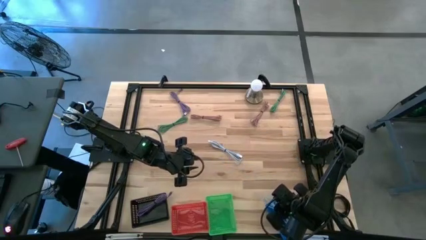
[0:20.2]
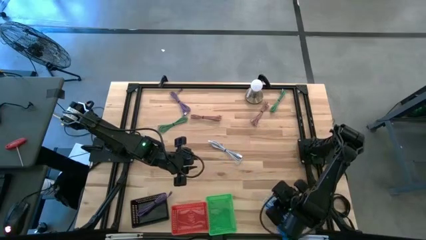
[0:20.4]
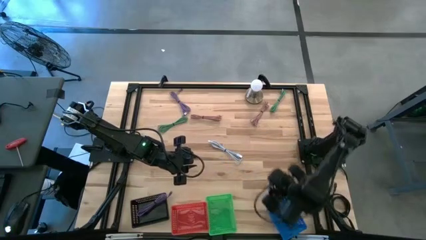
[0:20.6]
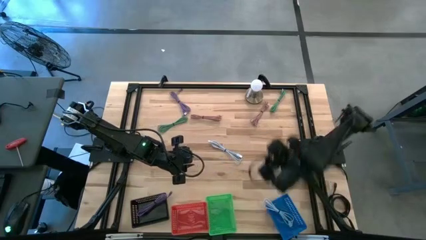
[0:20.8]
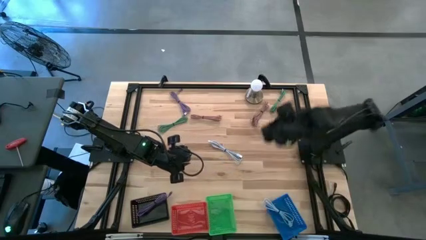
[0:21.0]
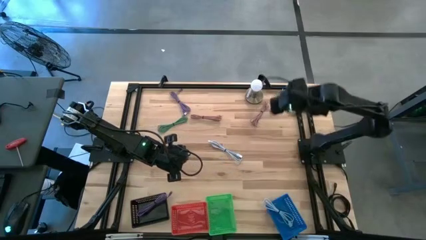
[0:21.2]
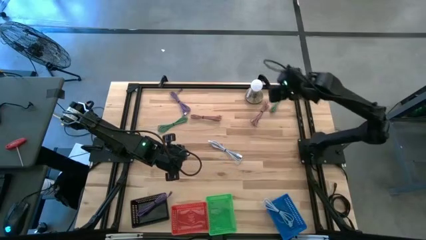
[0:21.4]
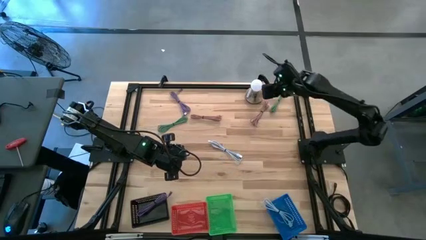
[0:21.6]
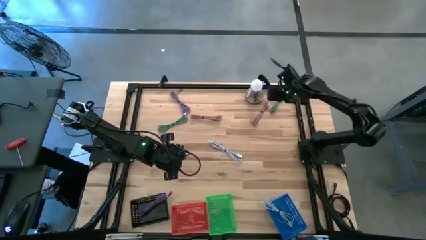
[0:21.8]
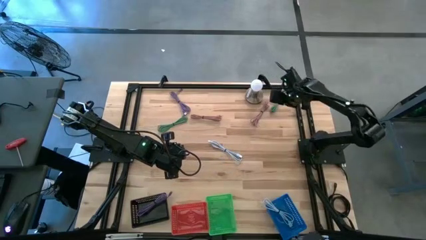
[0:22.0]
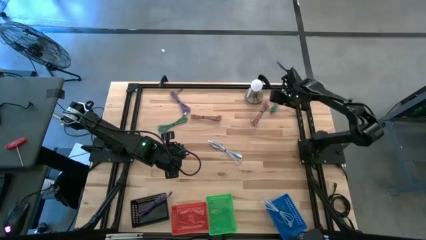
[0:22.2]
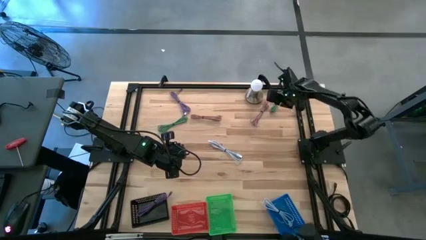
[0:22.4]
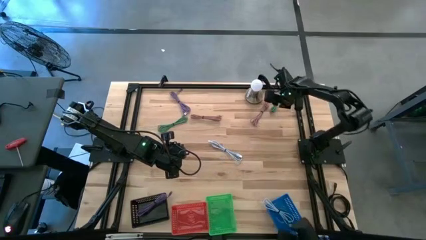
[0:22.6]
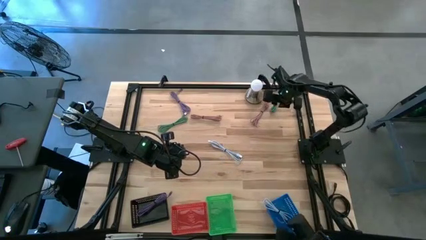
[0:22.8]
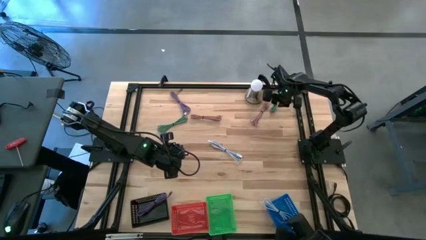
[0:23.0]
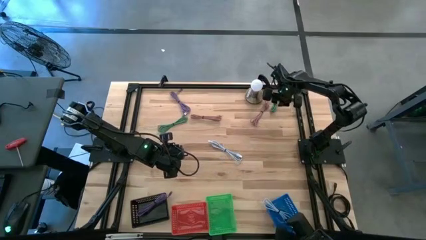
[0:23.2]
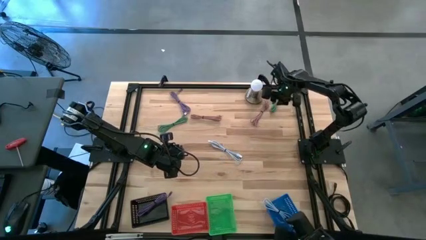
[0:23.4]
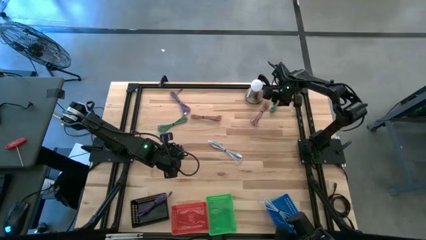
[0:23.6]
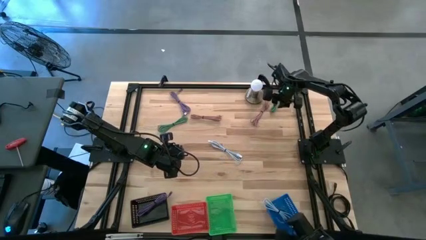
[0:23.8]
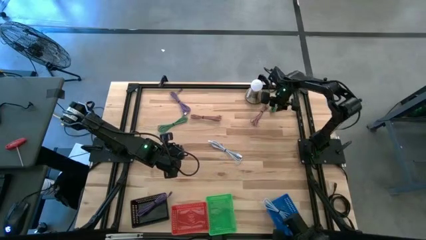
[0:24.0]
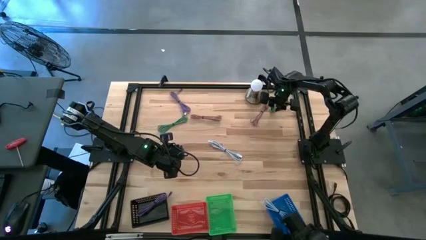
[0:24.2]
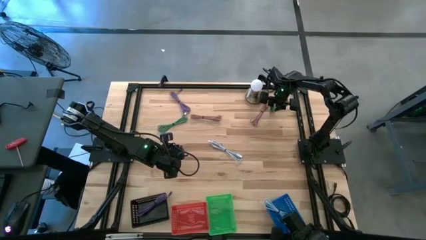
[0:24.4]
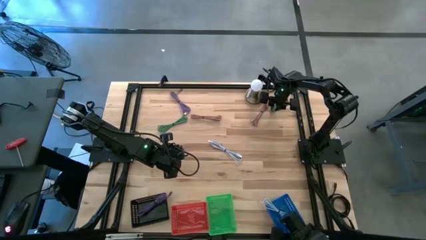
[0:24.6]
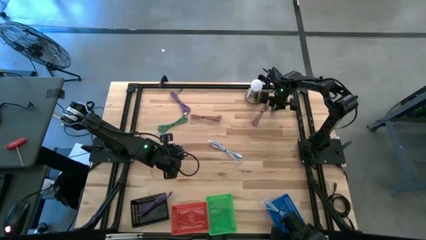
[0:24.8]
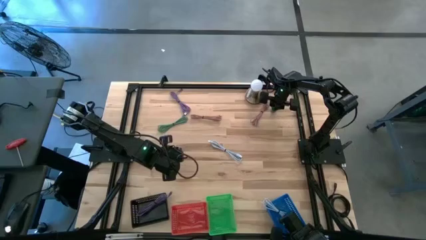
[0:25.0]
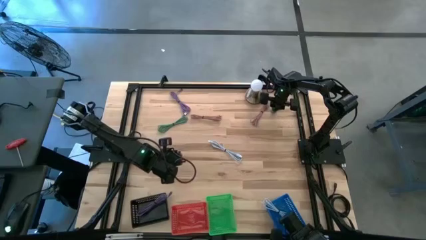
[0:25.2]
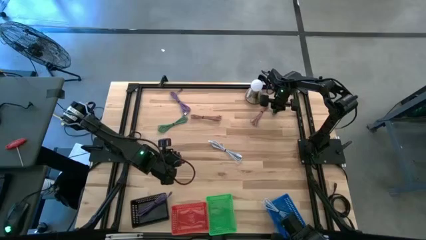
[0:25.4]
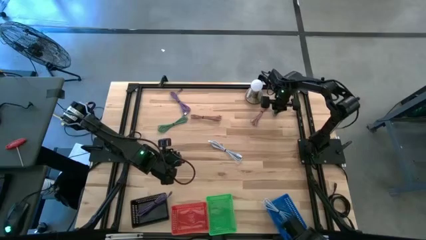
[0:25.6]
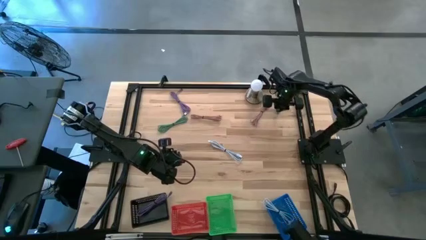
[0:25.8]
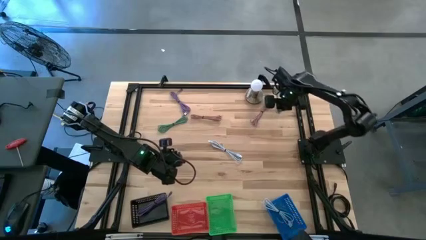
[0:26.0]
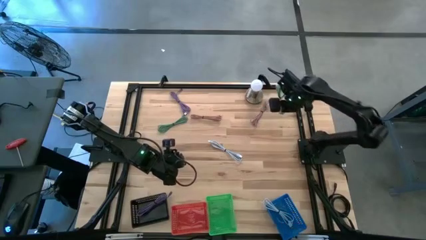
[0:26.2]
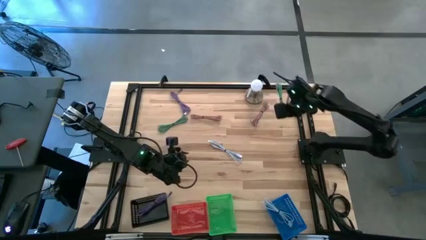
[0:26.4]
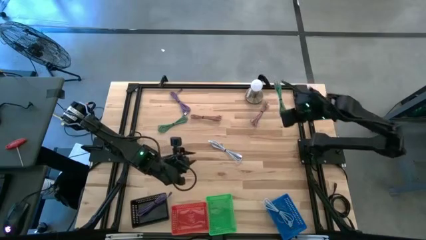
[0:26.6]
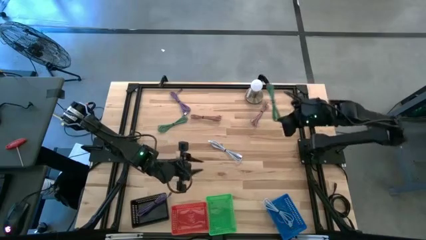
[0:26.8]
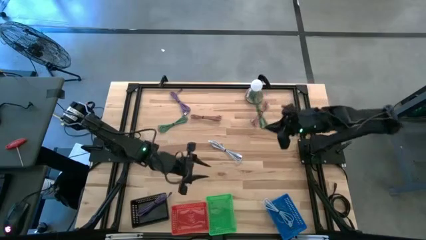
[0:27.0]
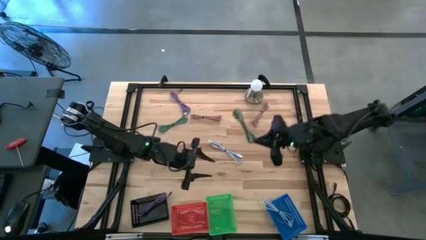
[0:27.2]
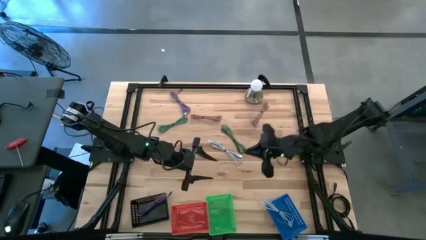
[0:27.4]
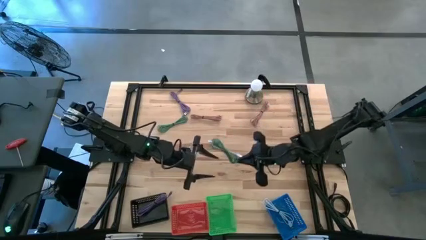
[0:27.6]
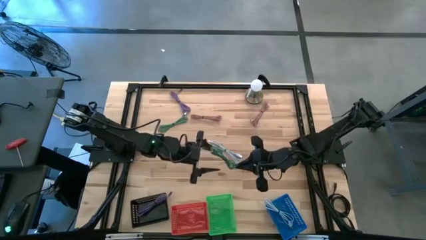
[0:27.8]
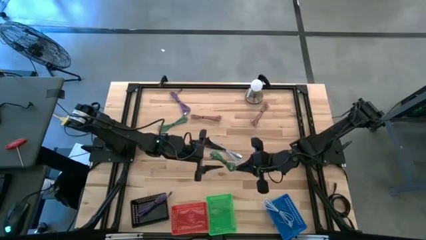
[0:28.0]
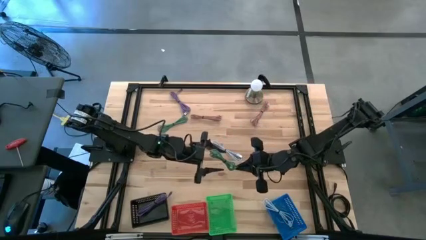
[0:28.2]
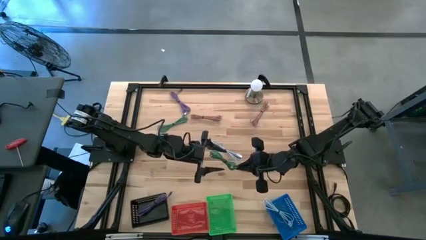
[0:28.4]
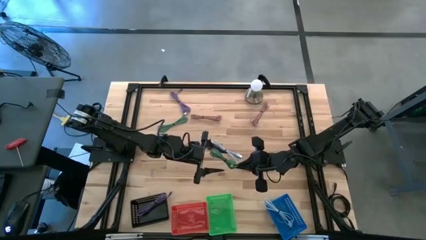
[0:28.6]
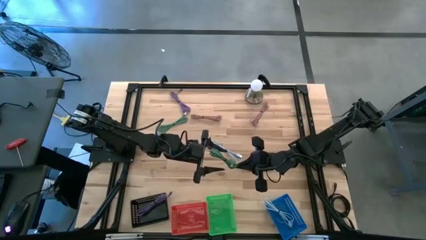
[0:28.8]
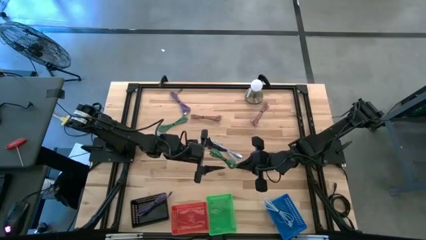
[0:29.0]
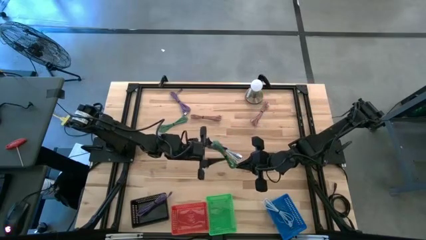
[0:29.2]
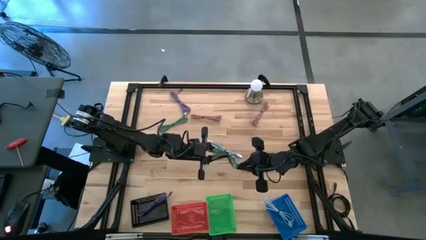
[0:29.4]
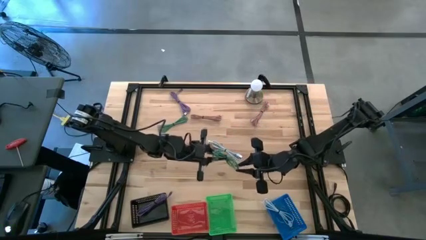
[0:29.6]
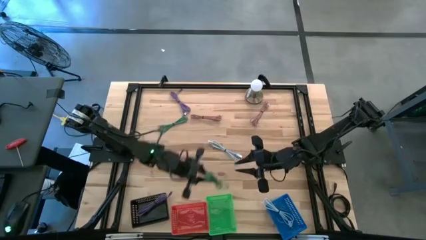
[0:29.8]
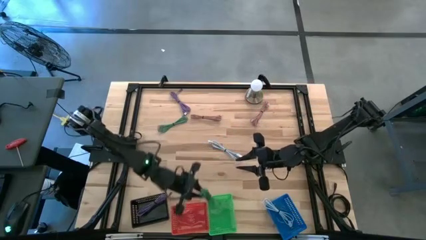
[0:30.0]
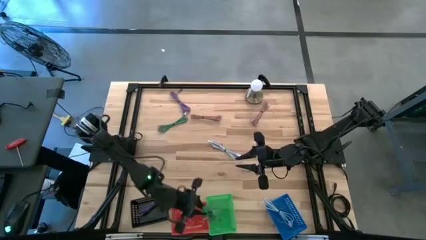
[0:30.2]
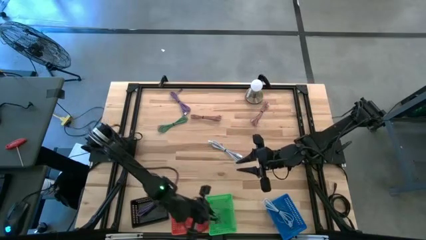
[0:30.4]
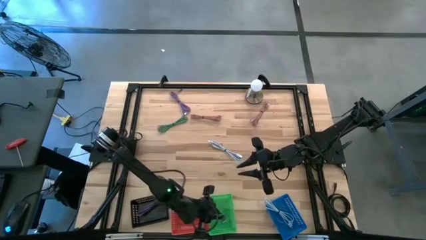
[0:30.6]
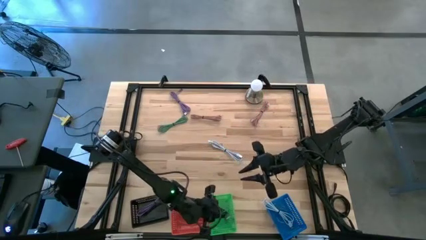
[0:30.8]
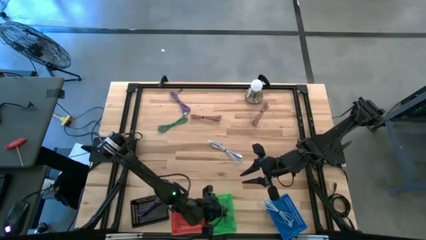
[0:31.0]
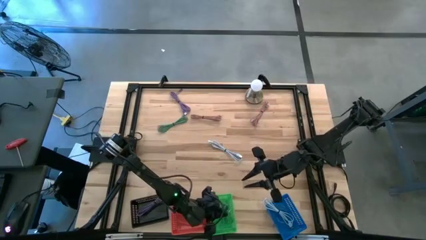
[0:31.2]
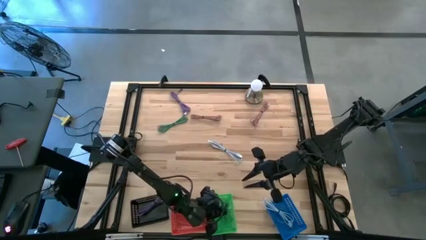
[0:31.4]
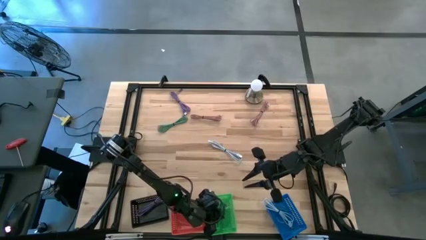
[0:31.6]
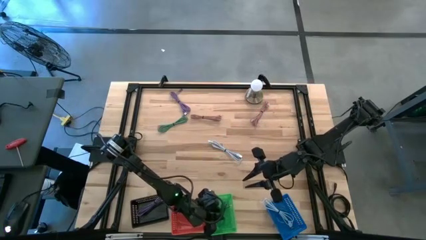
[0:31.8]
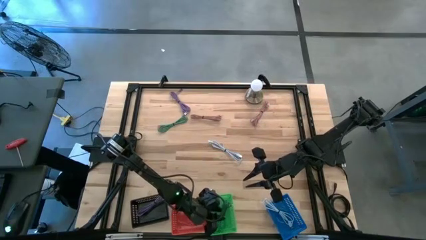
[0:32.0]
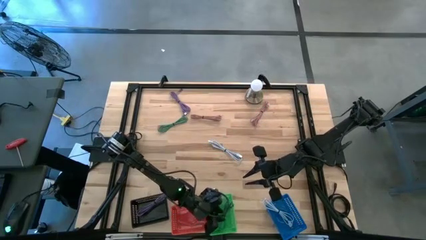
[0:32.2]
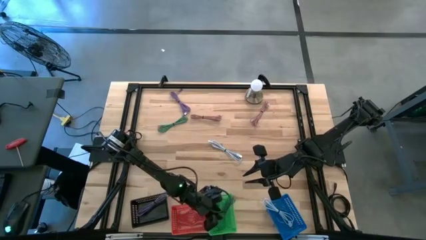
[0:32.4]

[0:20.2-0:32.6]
Task: Pick & Place USB Port
Put the right green charger cable into the green bin

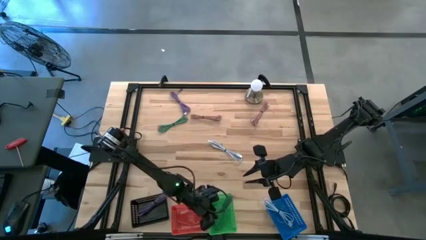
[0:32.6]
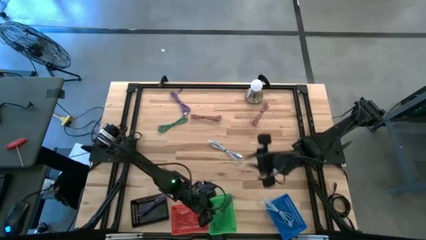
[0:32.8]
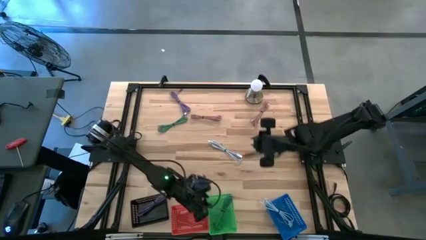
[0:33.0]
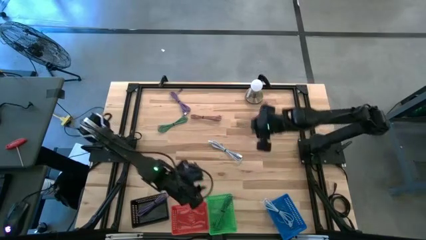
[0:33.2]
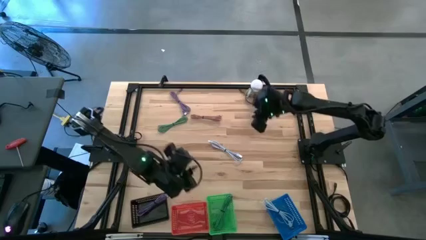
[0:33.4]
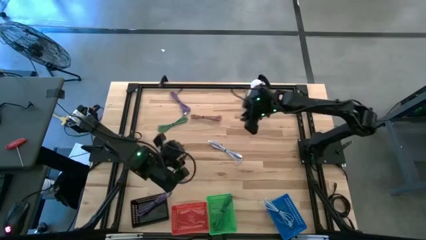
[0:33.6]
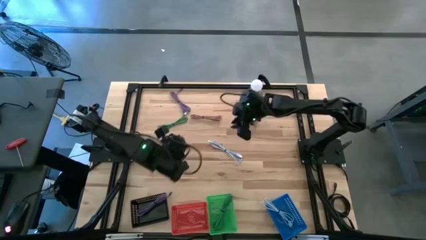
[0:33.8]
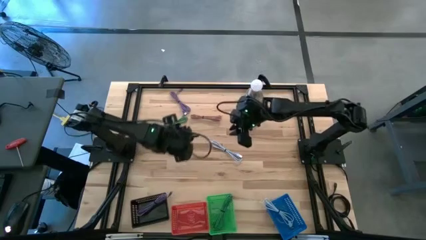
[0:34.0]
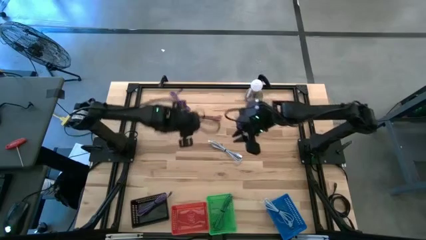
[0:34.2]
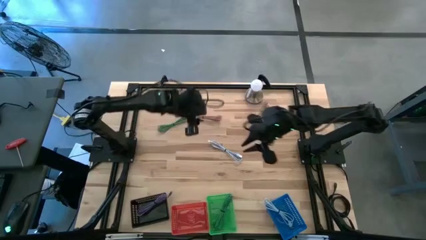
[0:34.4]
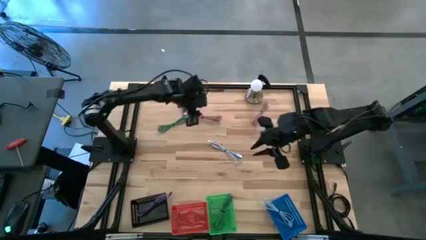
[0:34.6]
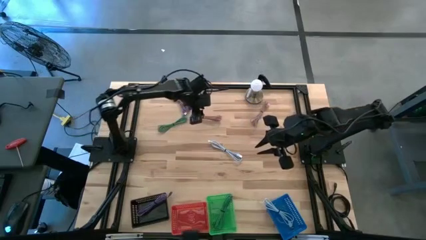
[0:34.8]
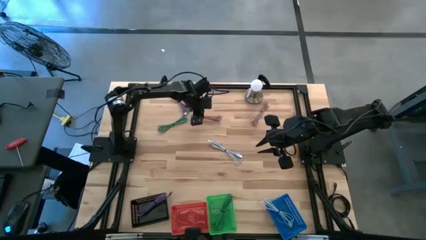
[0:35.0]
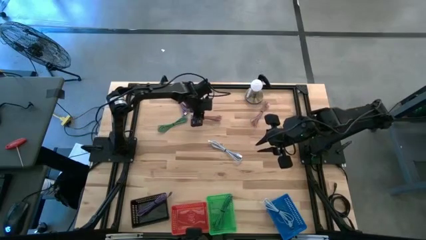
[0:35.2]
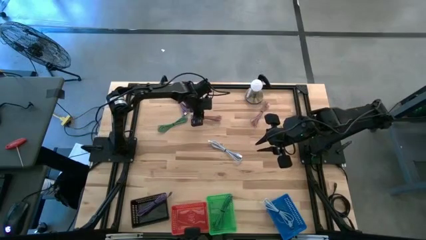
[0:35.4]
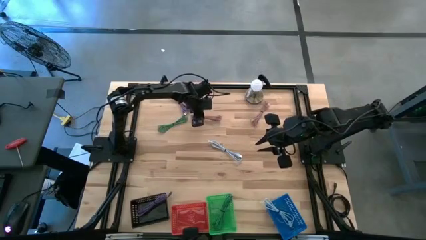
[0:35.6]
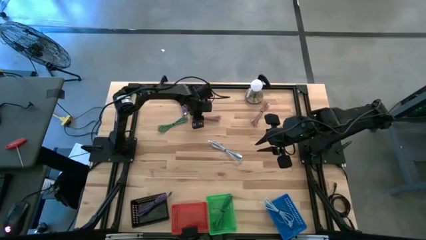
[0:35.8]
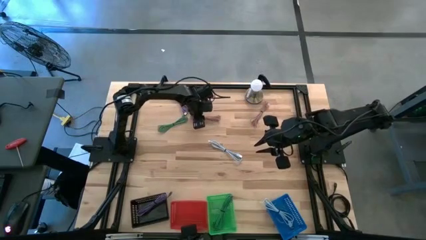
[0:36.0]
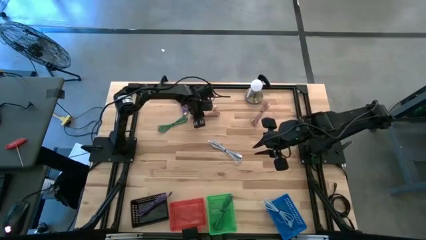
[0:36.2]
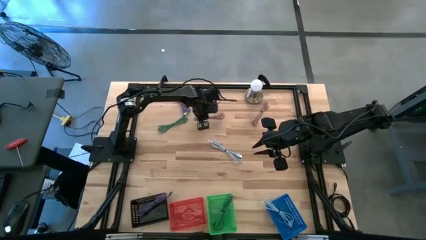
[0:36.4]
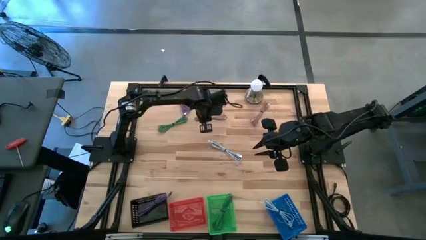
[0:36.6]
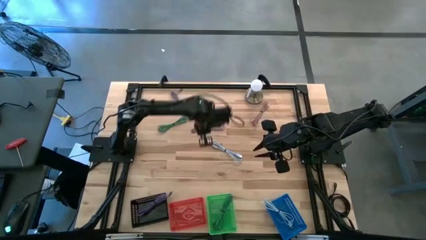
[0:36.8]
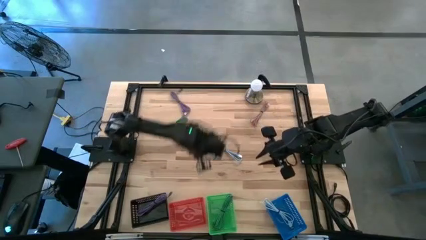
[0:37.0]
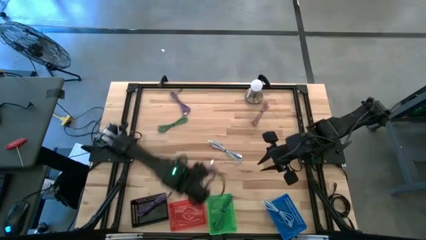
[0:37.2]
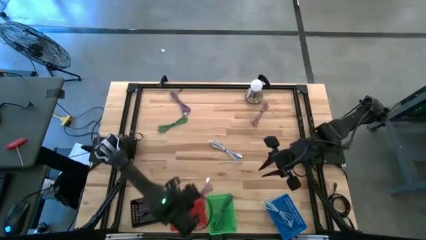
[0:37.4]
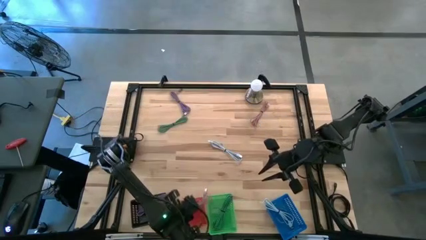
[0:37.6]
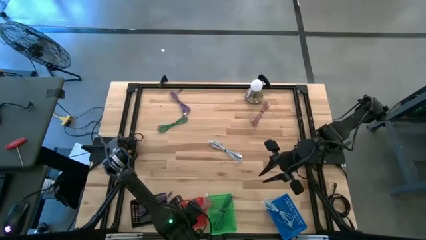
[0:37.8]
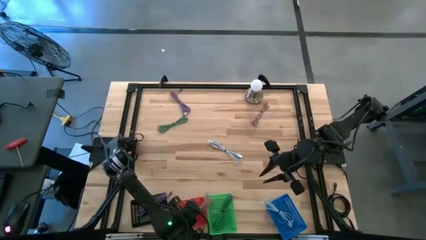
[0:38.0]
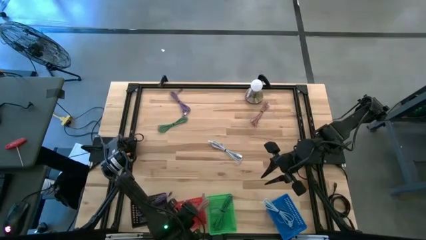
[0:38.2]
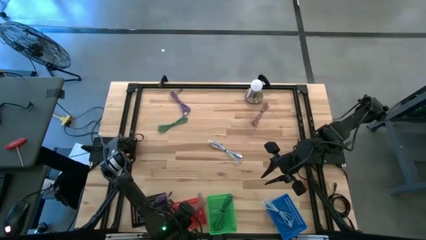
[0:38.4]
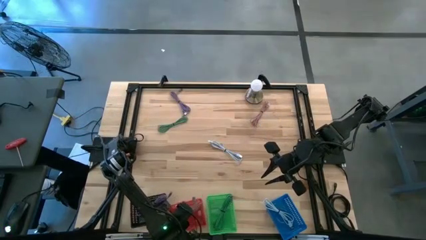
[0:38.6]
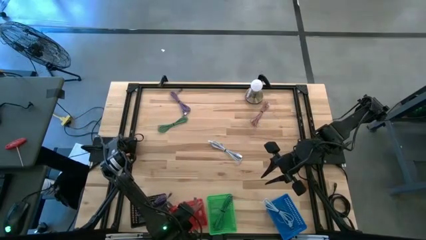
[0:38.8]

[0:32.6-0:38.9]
Put the left pink charger cable into the red bin
